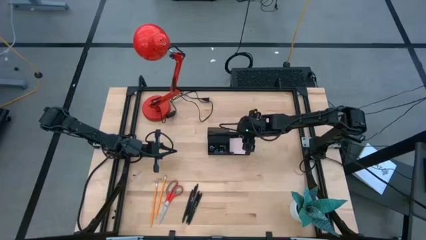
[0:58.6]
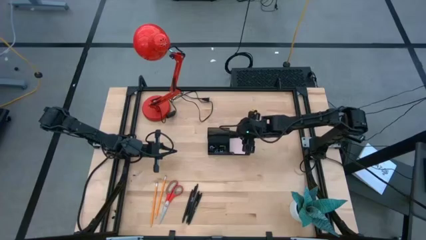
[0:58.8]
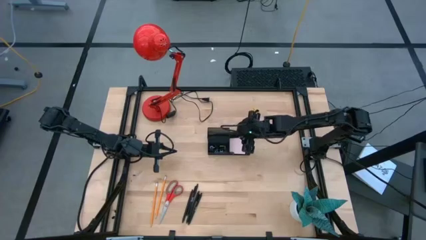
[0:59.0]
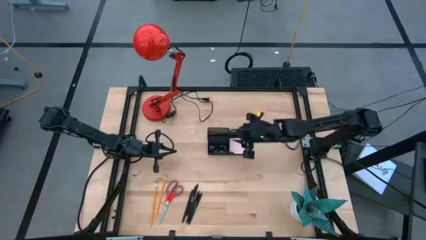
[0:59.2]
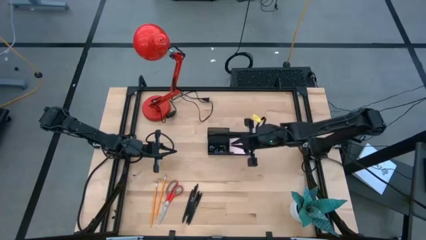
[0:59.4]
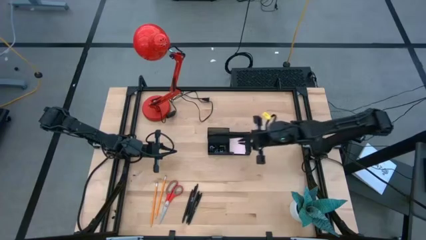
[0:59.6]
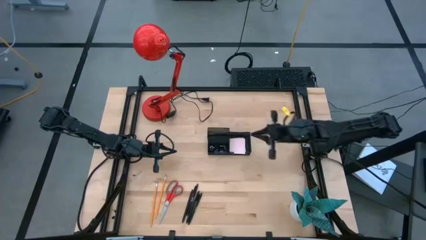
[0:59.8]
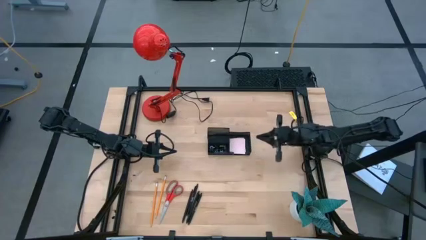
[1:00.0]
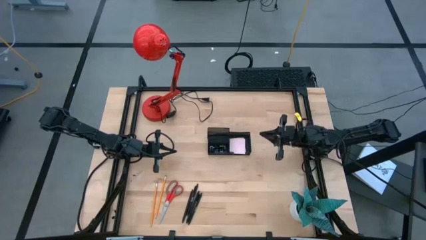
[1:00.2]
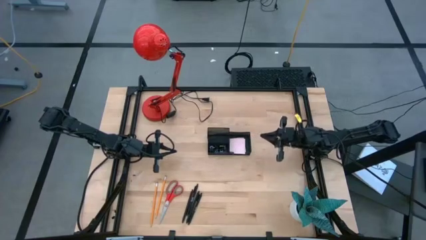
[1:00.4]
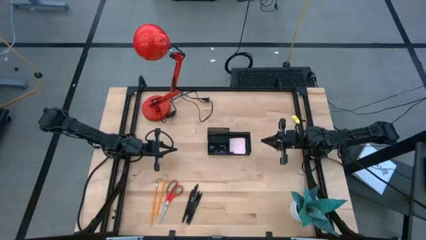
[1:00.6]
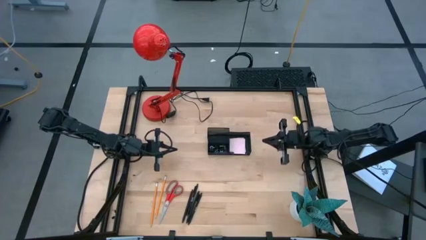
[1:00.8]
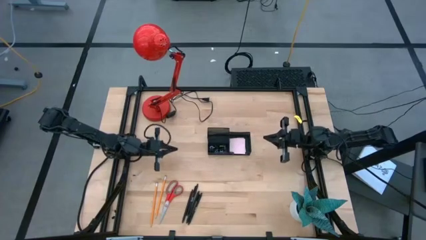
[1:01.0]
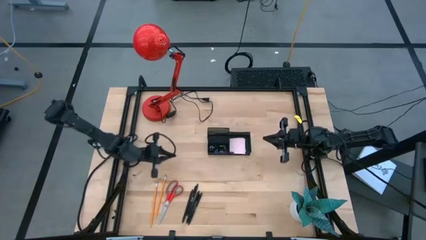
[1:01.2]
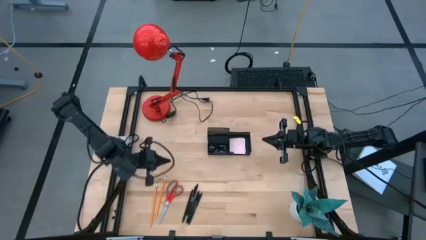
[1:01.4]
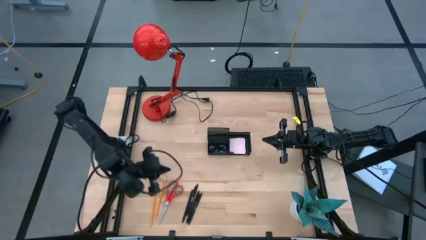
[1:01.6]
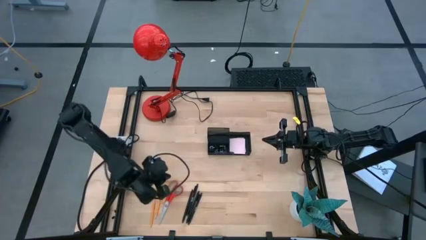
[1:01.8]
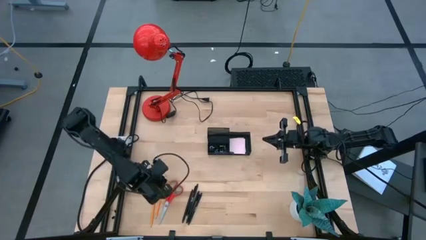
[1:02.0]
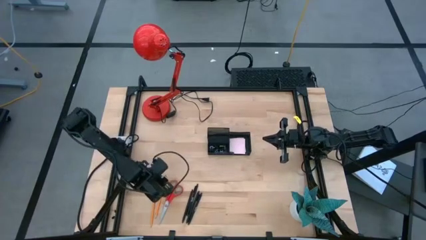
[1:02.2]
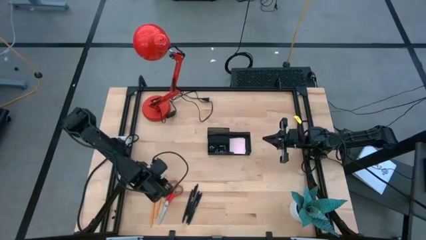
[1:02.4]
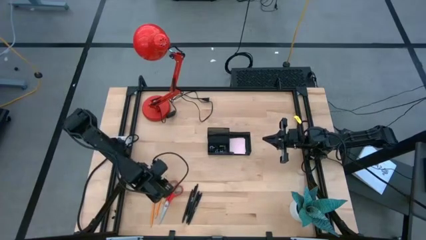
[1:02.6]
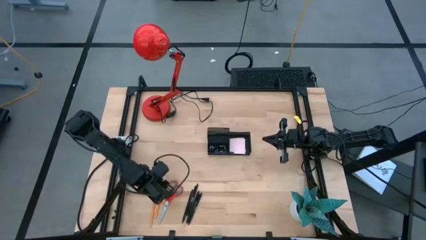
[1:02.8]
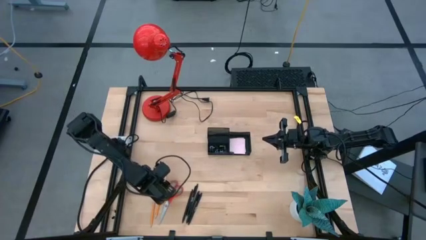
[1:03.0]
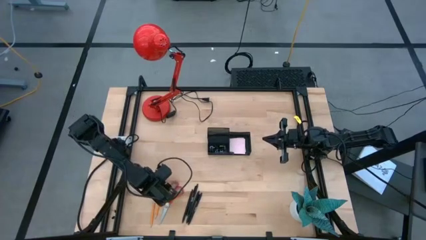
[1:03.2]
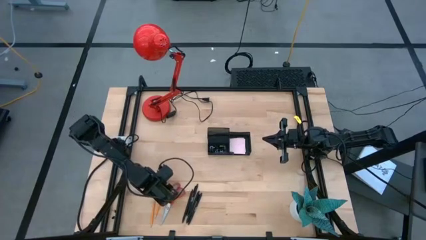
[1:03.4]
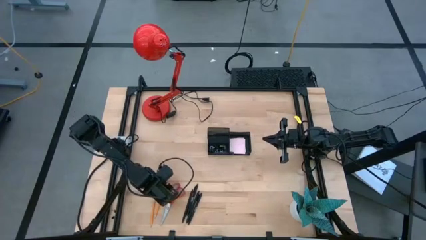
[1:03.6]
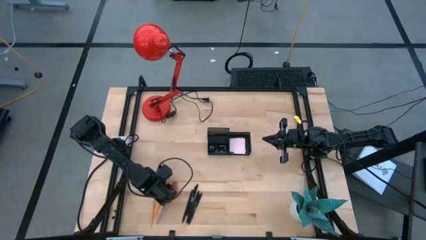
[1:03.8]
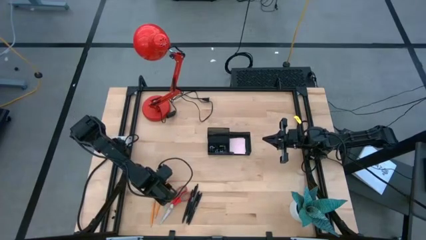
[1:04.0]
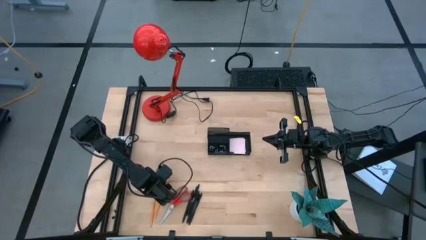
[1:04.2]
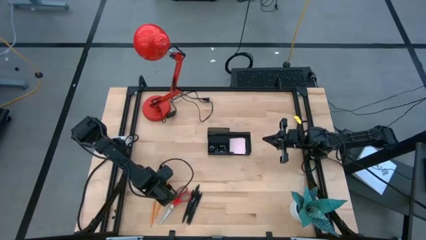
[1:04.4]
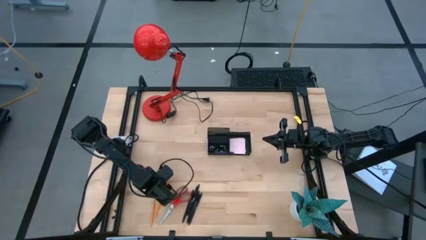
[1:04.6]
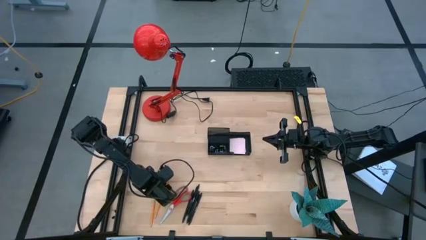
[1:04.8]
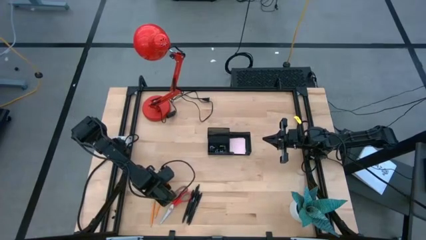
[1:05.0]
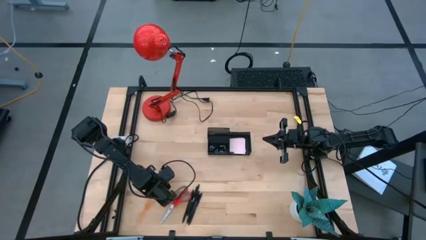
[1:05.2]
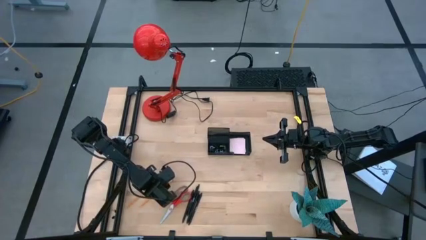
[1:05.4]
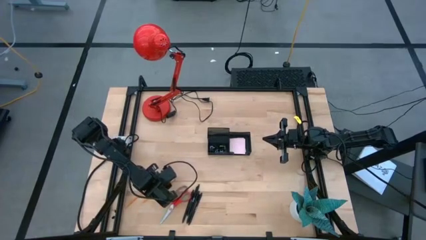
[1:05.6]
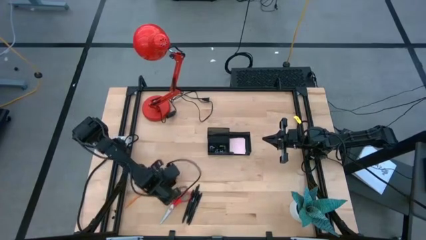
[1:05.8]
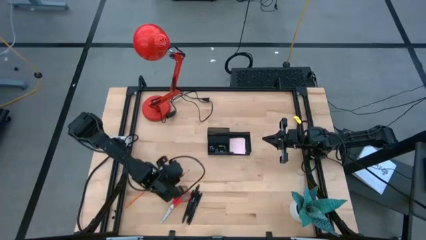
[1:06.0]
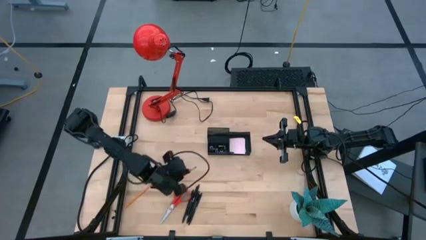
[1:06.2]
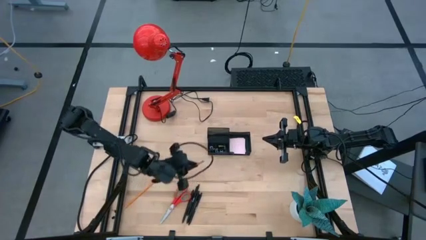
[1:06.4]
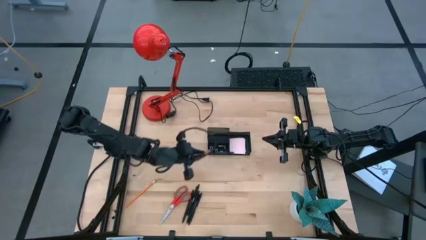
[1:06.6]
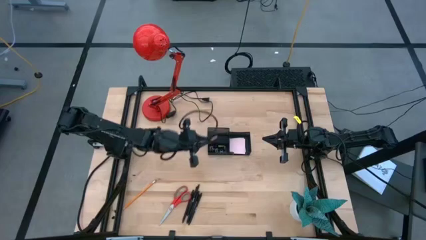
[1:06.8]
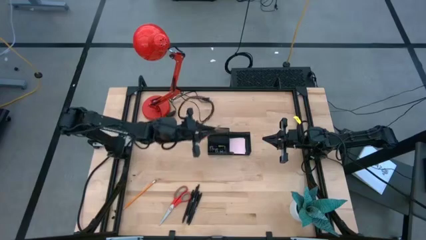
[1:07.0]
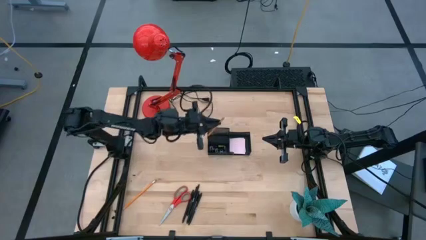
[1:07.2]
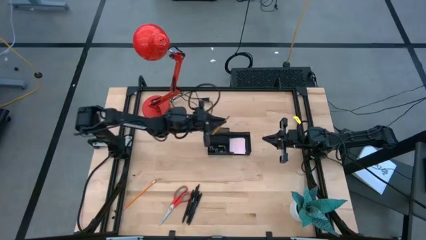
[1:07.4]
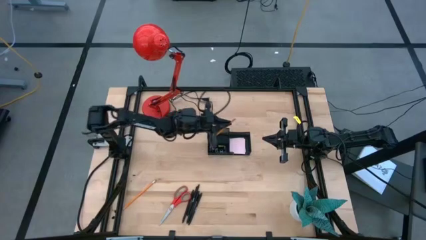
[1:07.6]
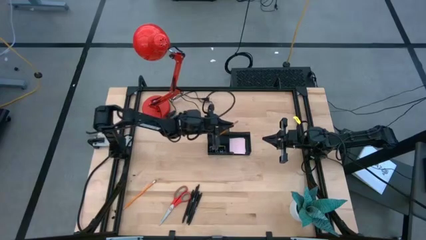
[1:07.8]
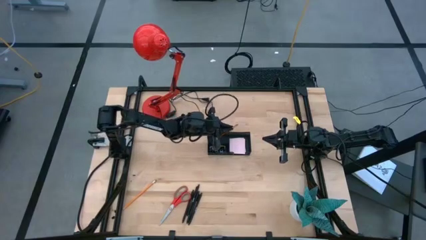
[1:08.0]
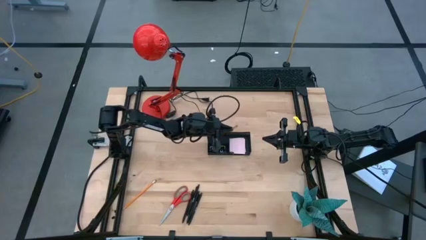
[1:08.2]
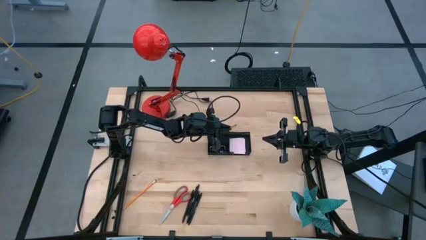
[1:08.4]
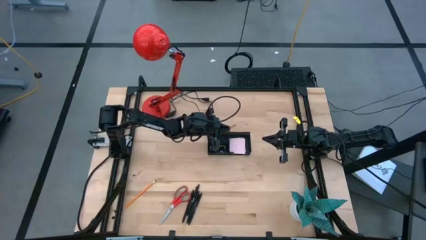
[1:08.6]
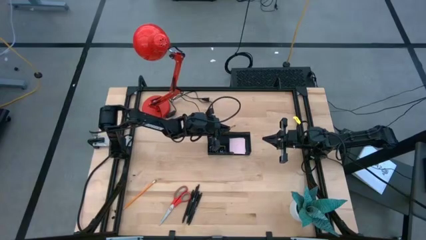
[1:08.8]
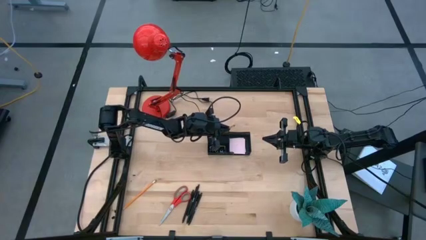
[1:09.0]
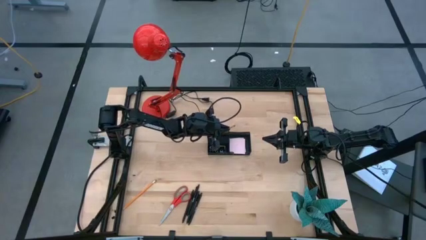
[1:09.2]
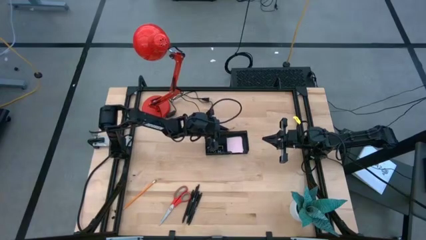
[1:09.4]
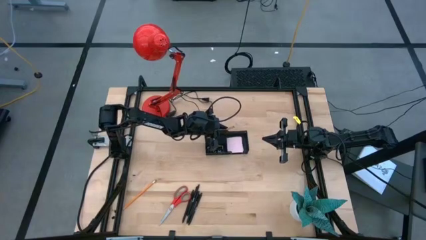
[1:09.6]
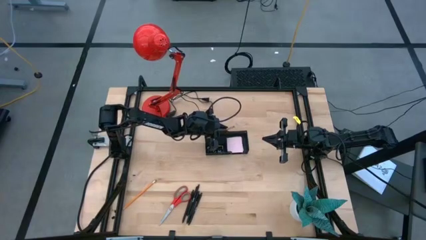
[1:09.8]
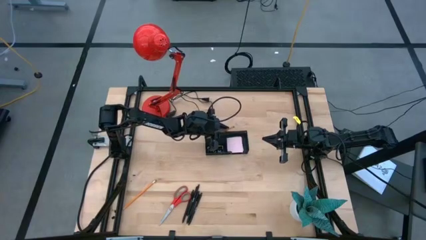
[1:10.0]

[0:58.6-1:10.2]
Task: Pick and place office supplies into organizer
Put the right orange pencil into the black desk organizer
